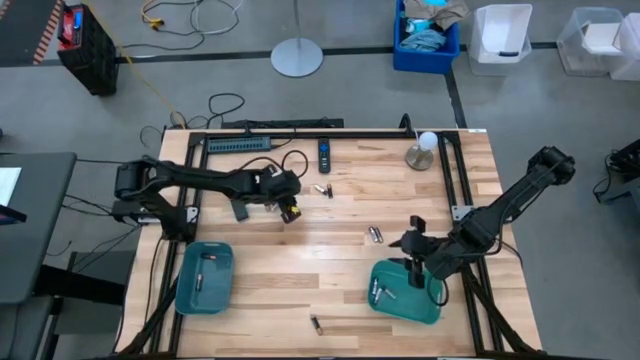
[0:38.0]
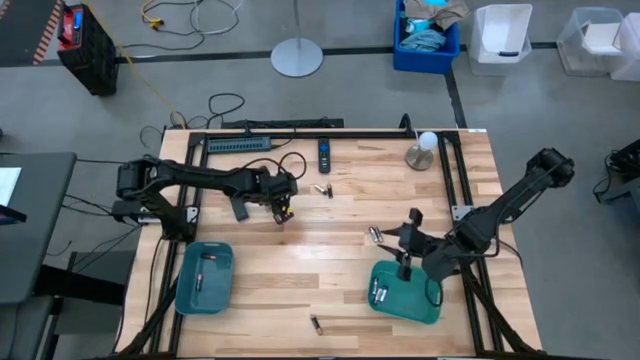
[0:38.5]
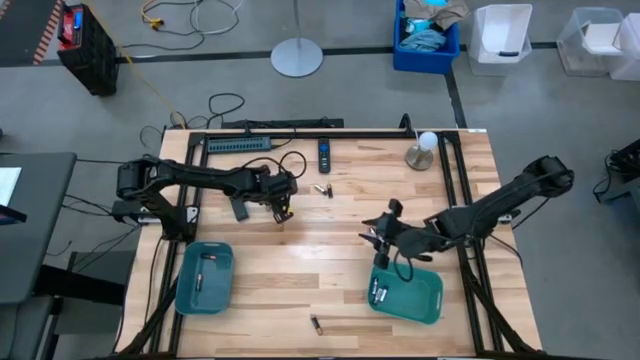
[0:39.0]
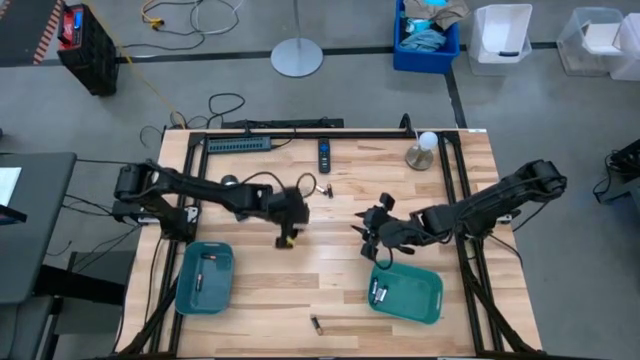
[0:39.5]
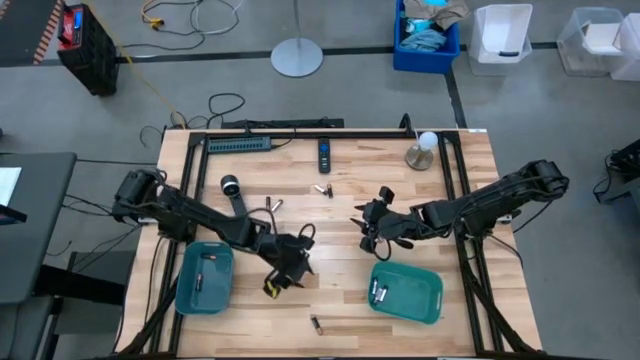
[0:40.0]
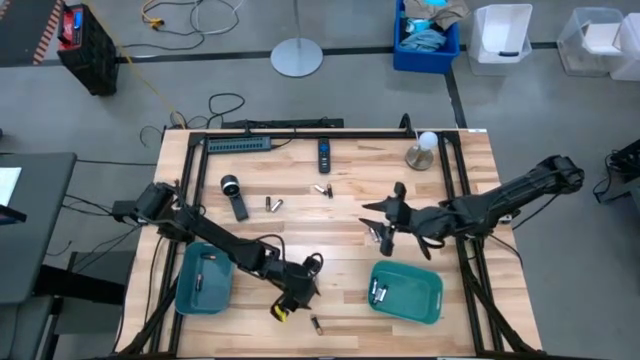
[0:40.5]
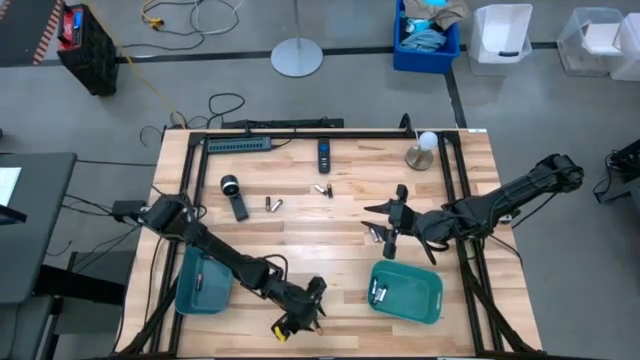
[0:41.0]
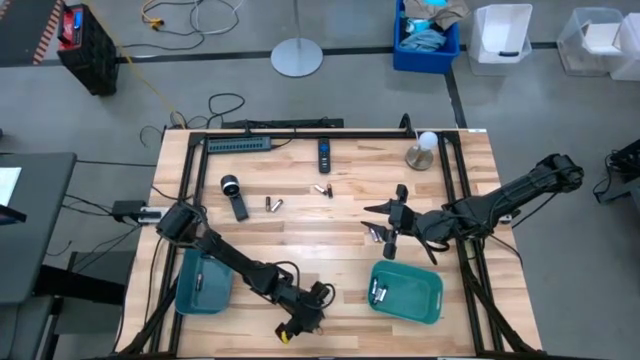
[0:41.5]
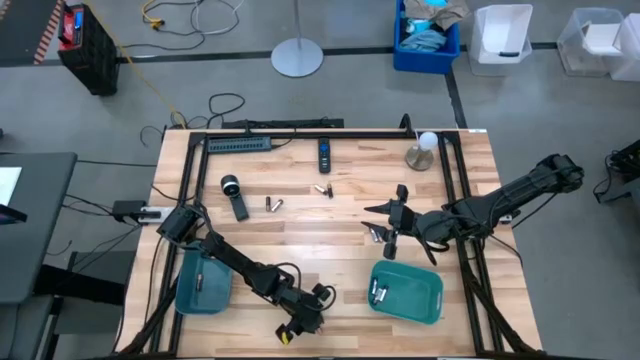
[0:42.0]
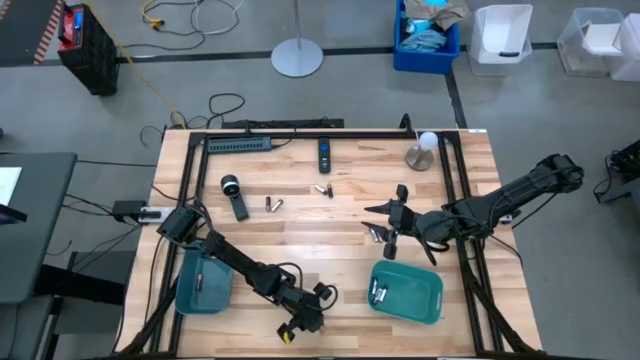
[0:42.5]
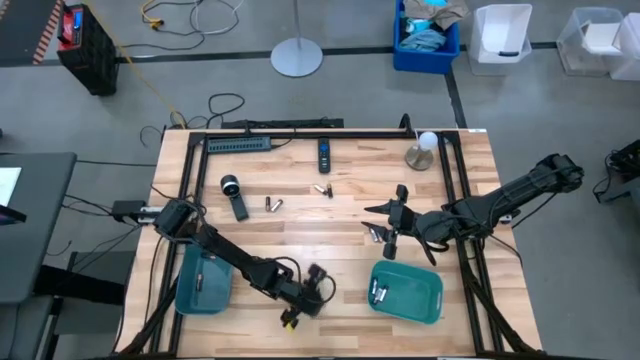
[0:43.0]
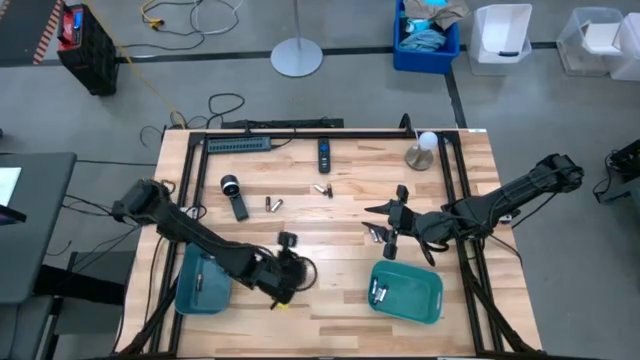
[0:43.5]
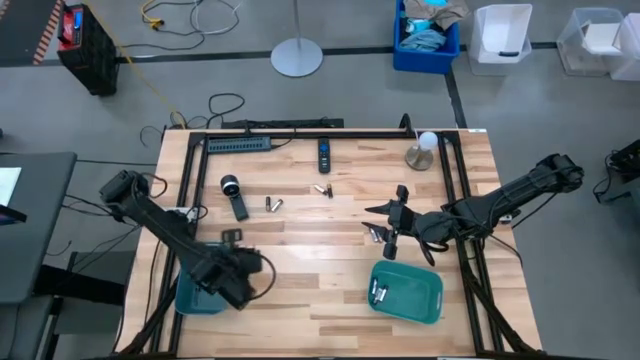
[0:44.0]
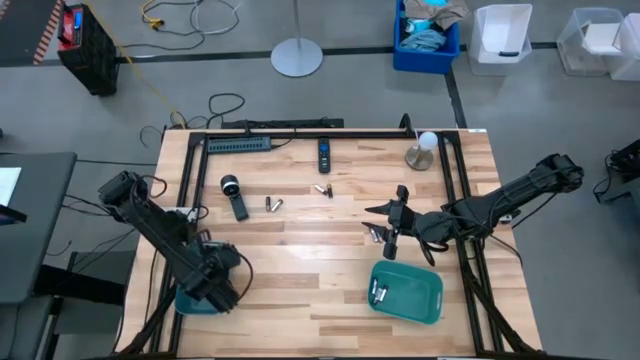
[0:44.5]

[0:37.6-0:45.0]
Task: Sort batteries
Put the black battery into the blue bin

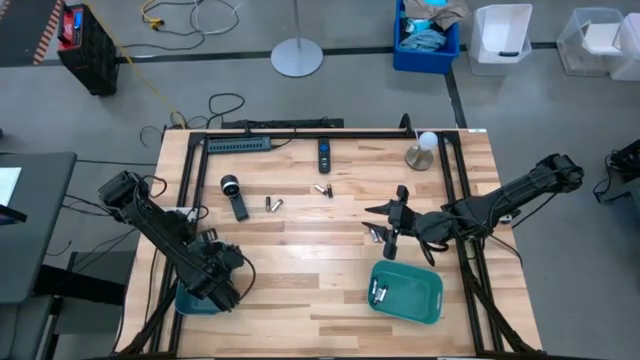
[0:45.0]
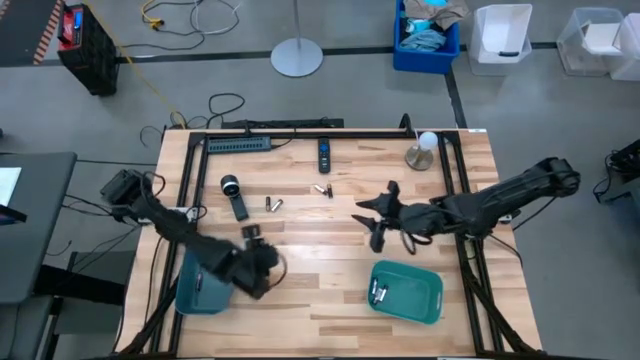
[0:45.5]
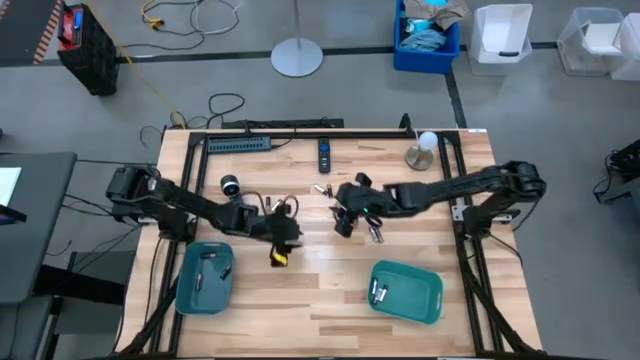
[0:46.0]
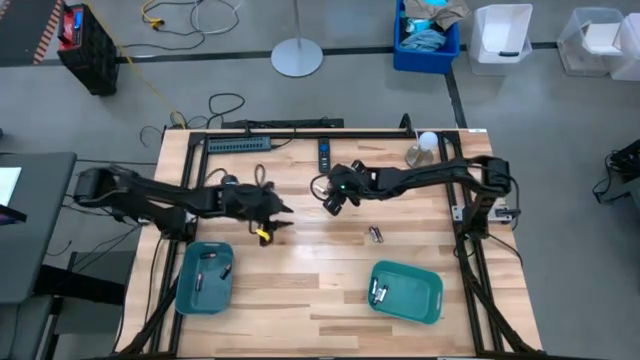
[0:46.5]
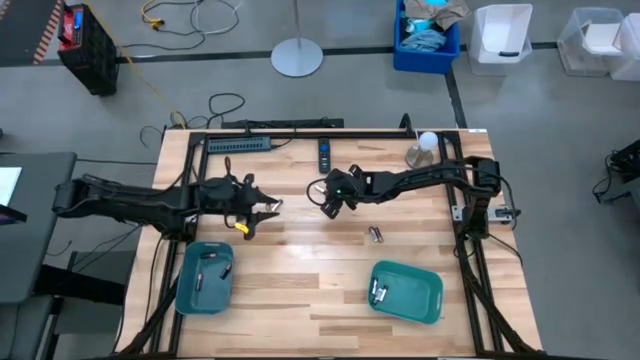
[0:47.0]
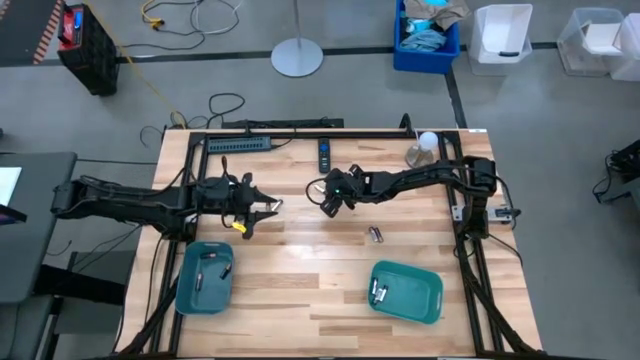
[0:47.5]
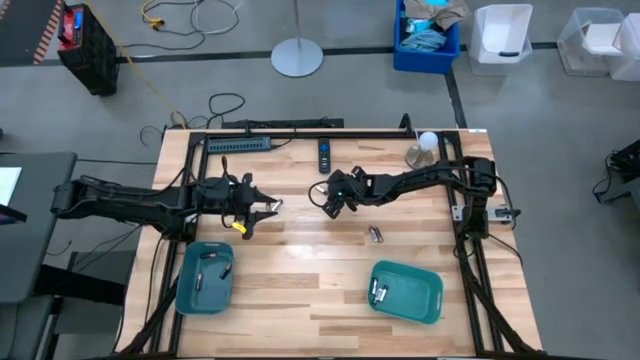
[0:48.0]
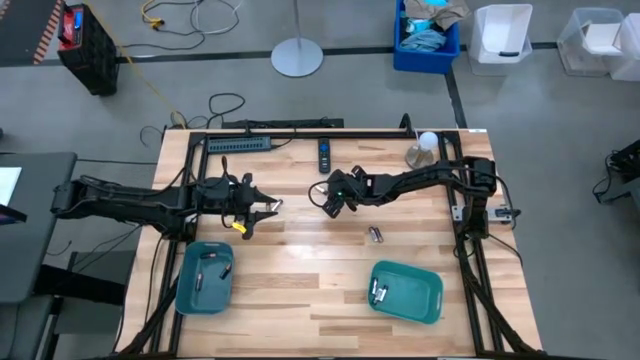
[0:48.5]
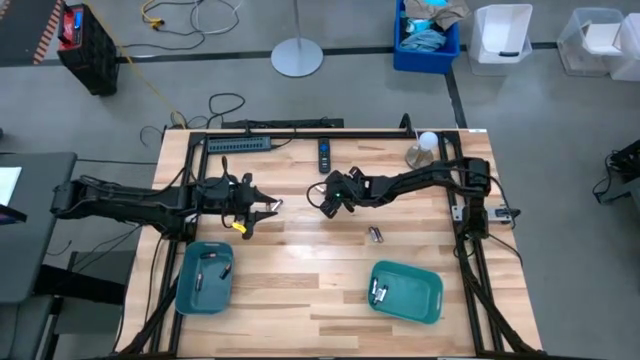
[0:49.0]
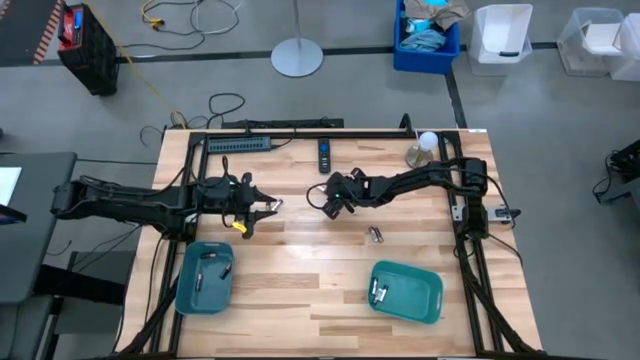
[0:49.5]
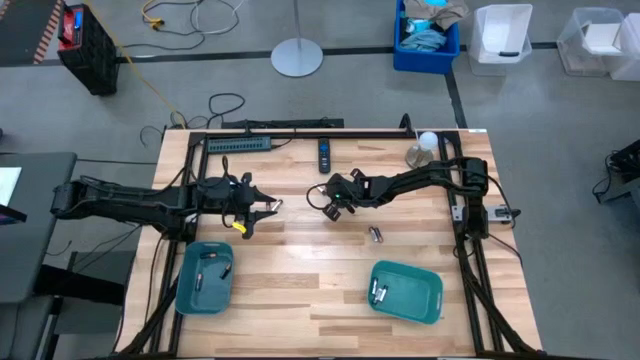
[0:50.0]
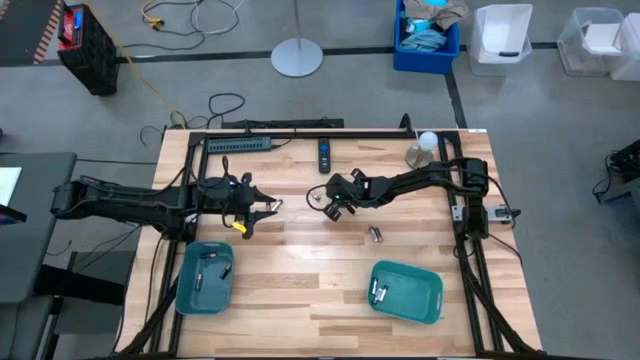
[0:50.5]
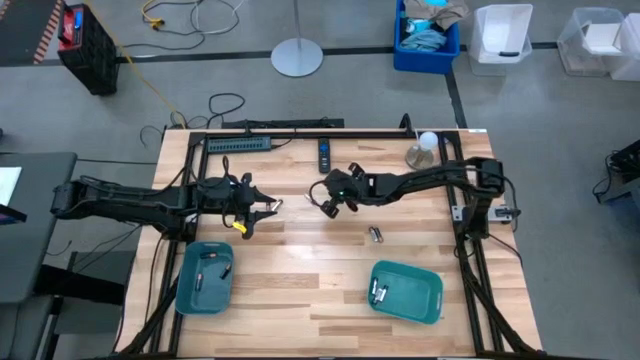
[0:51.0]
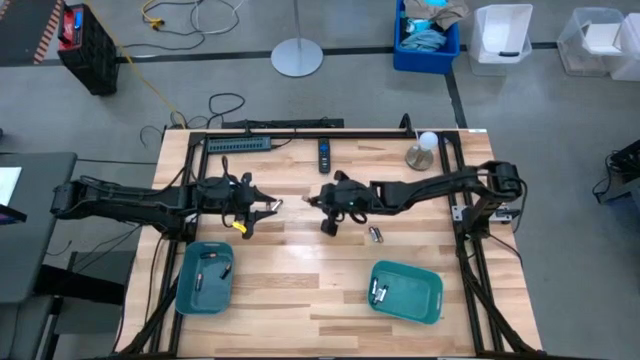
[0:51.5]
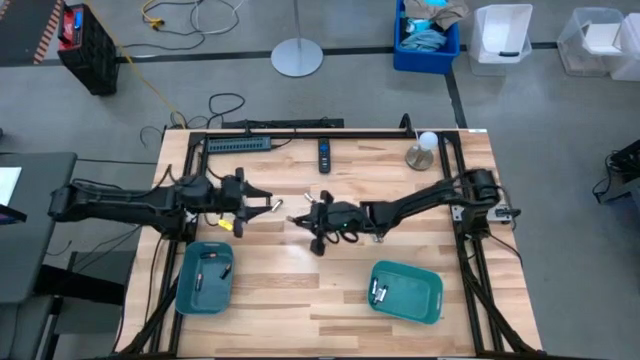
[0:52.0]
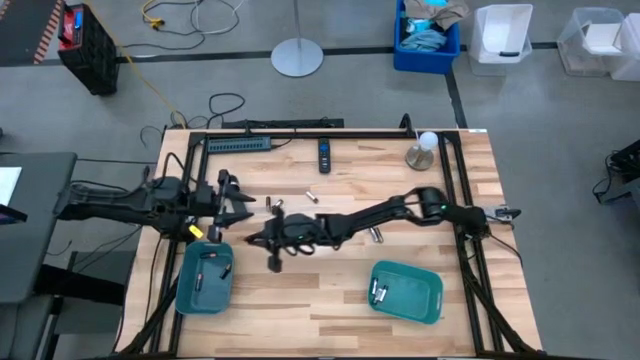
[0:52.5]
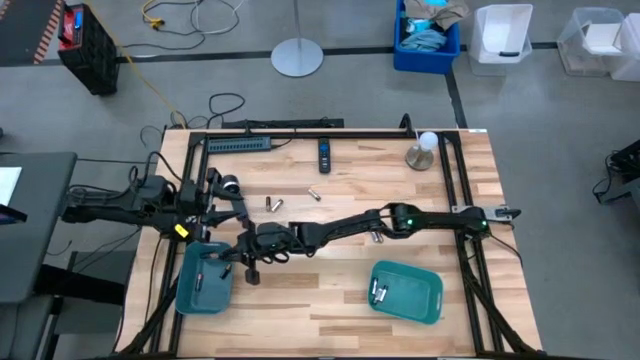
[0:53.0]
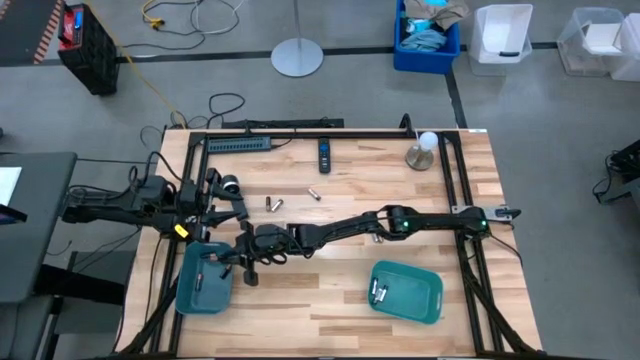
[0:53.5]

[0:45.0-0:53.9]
Put the black battery into the blue bin

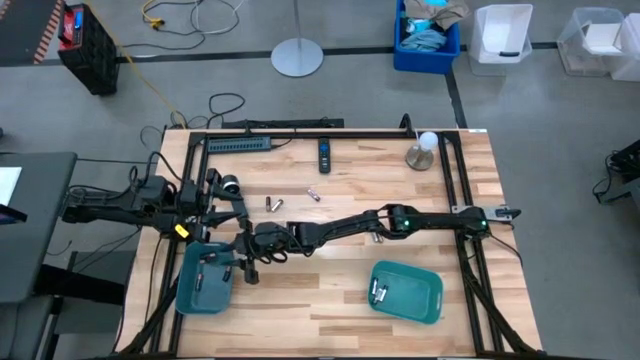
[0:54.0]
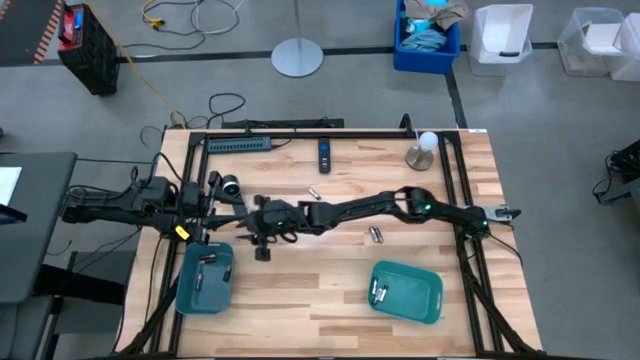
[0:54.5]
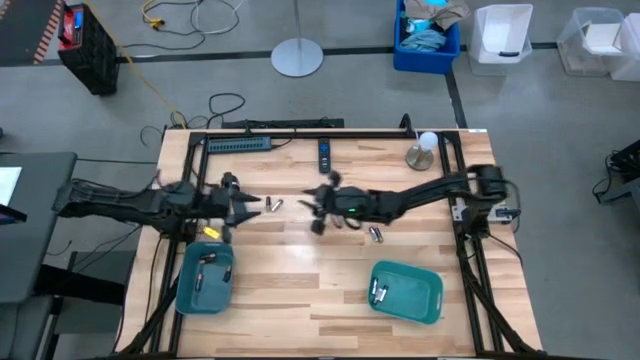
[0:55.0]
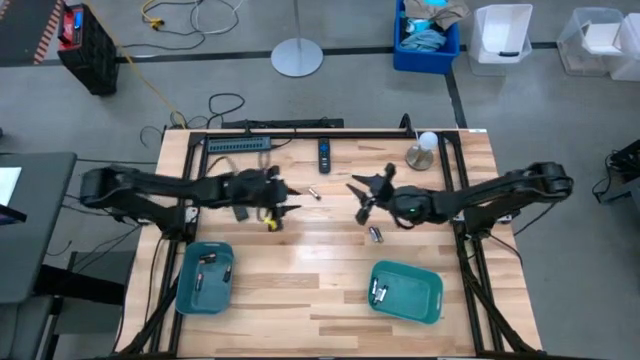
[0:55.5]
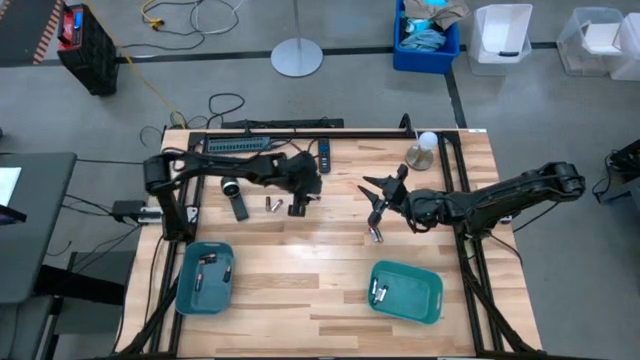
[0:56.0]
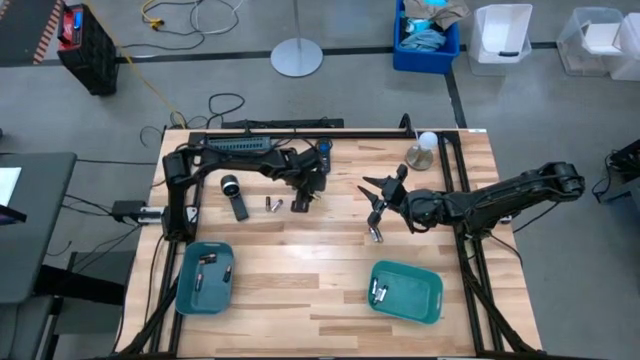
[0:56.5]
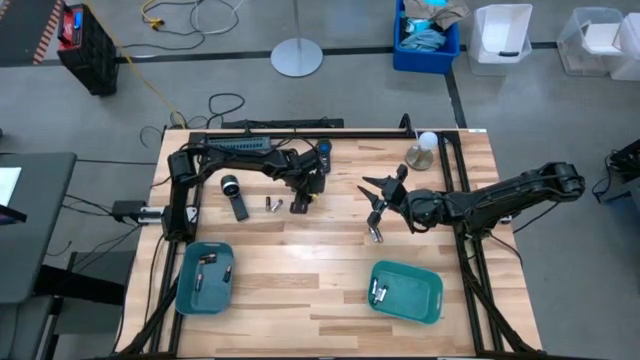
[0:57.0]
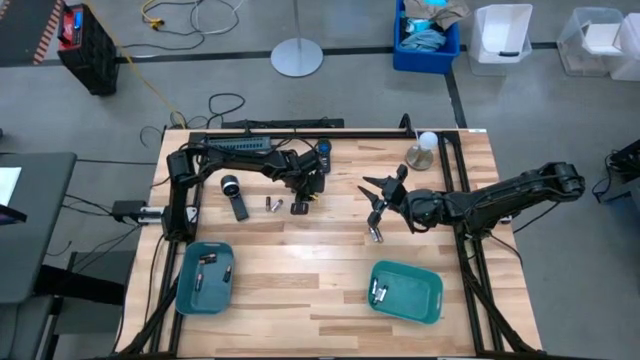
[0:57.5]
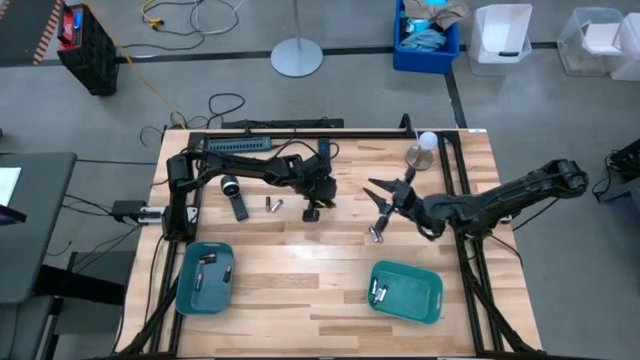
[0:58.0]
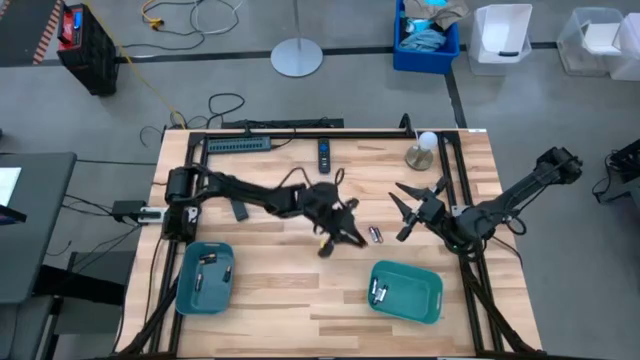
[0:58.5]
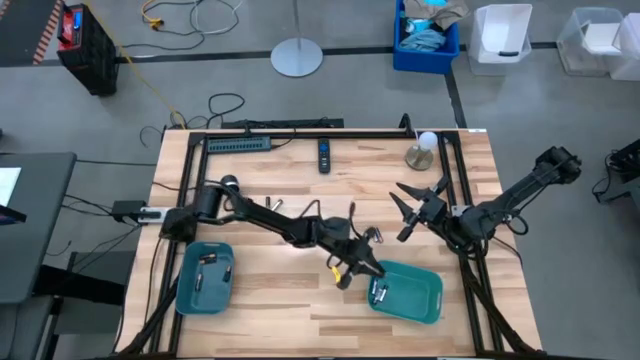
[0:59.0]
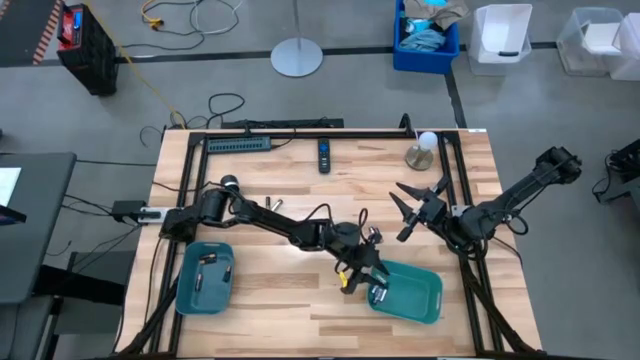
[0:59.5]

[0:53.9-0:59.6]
Put the silver battery into the green bin
